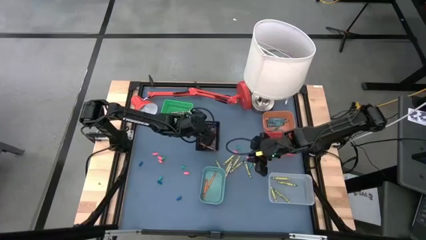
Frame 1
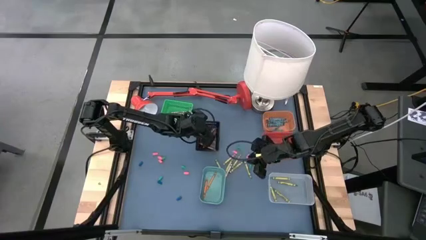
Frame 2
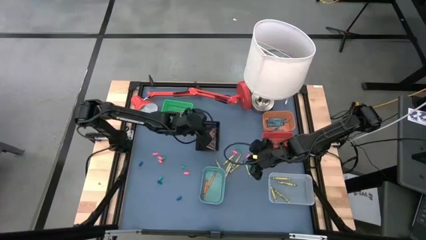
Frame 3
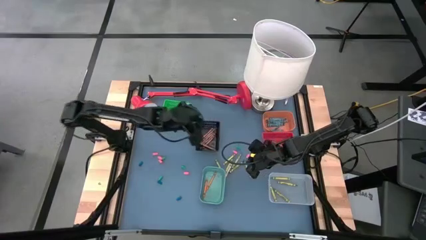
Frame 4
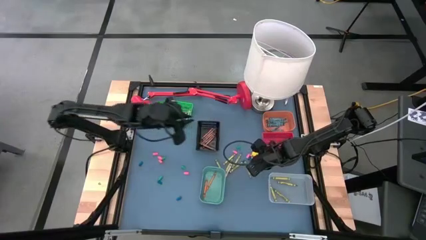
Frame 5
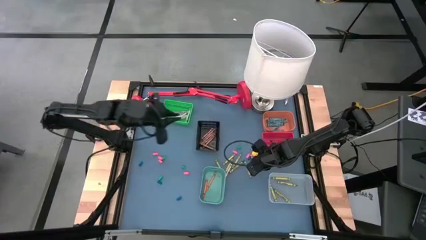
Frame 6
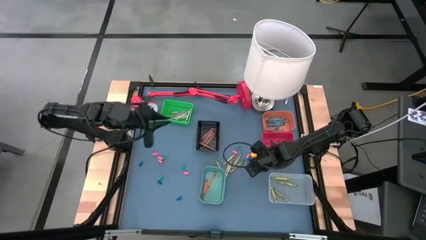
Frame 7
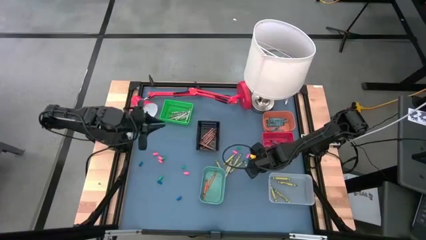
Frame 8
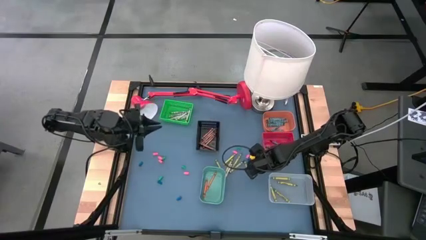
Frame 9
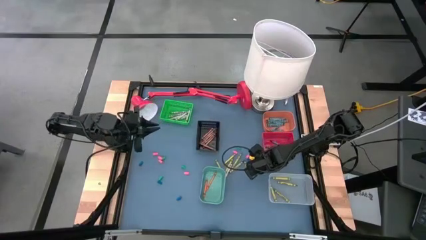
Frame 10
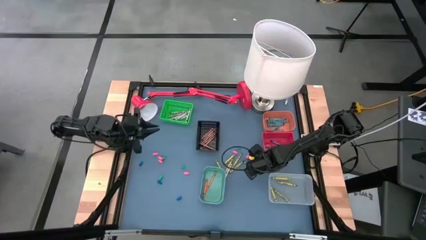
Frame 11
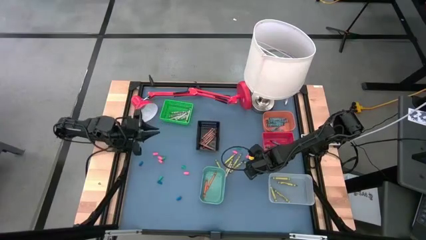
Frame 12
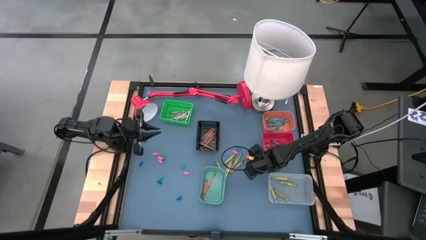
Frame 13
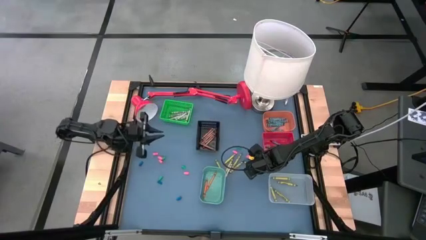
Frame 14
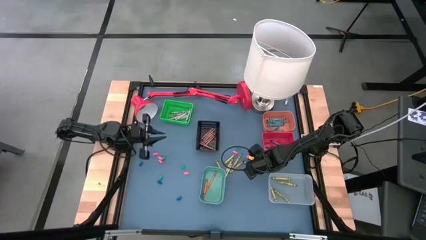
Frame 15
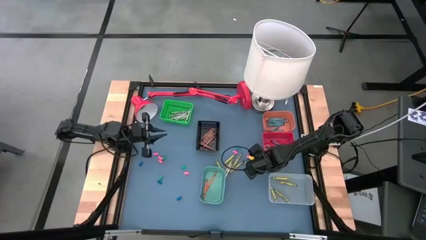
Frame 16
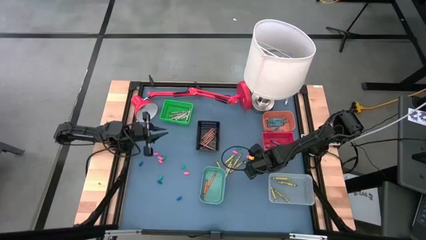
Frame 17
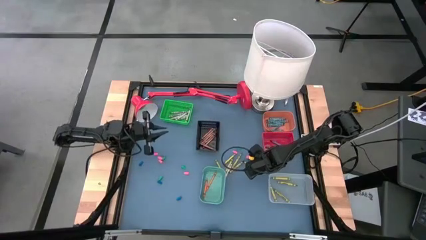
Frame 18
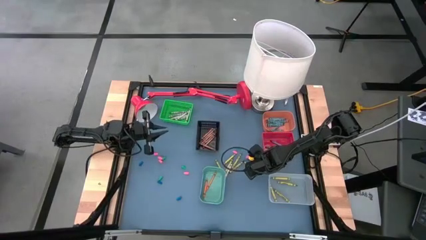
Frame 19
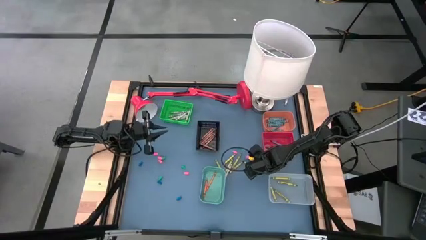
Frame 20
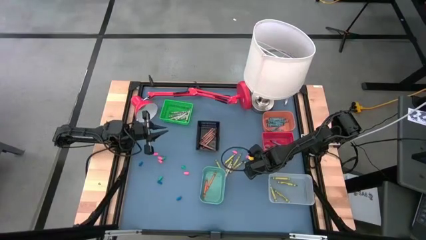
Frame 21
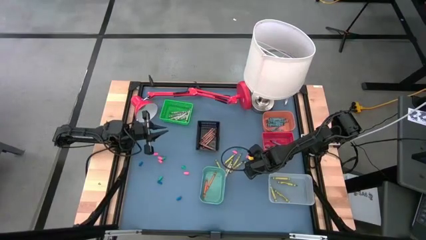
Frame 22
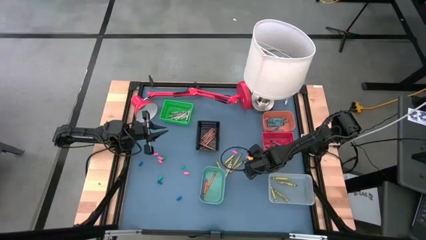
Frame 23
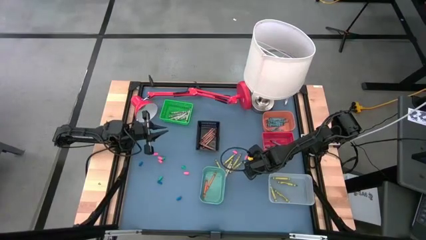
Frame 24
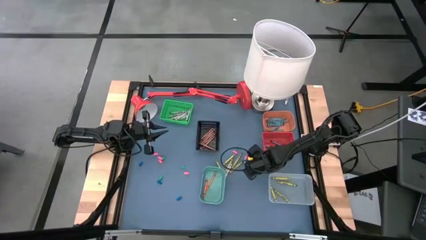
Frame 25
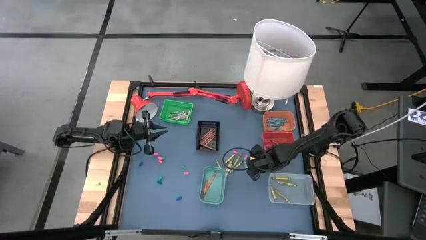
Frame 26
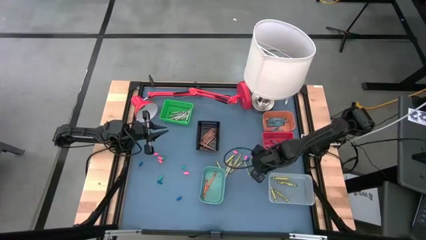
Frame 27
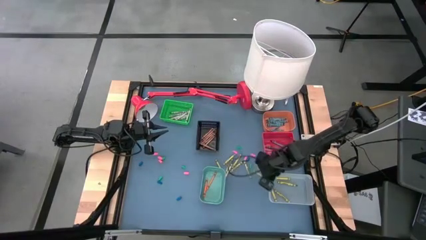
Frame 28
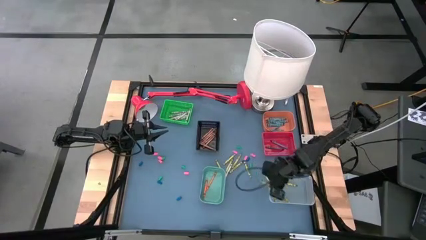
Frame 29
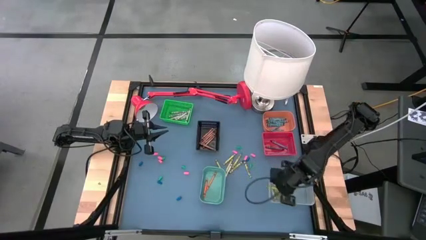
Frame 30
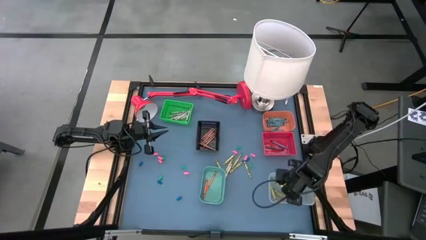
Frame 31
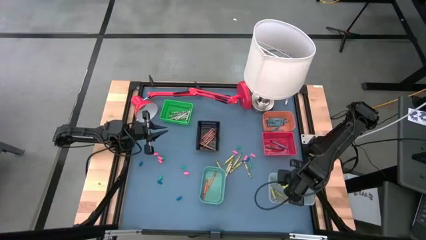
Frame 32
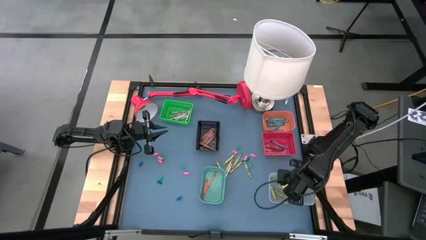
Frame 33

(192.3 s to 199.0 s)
Task: Sort crayons
Put the green crayon into the transparent bin

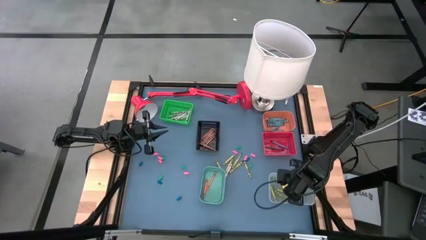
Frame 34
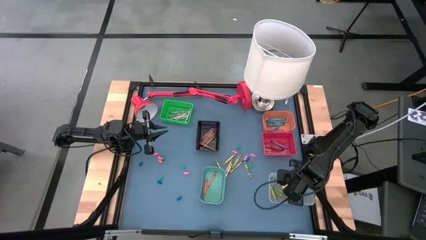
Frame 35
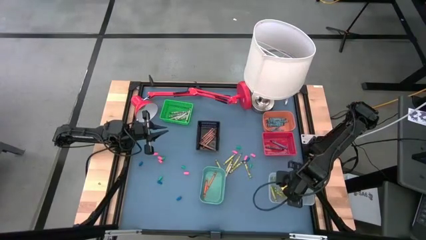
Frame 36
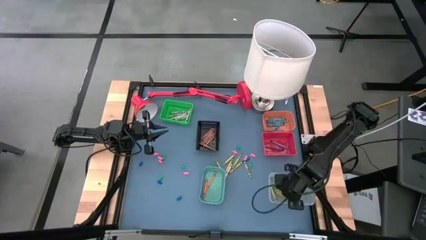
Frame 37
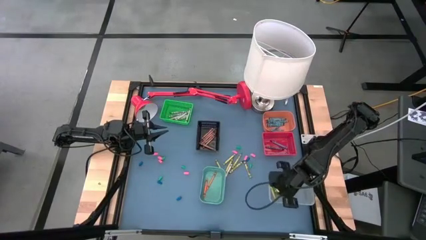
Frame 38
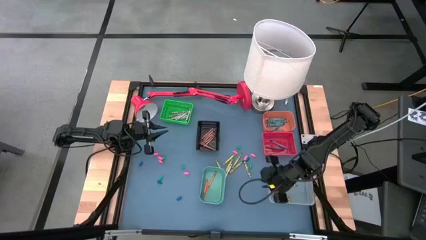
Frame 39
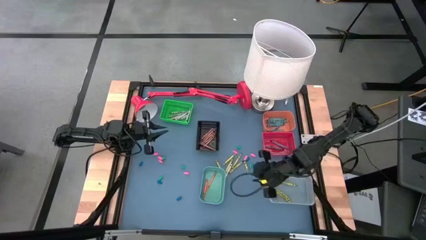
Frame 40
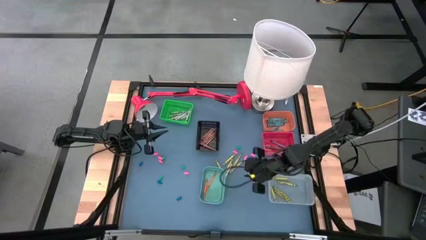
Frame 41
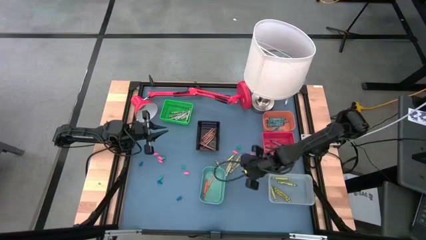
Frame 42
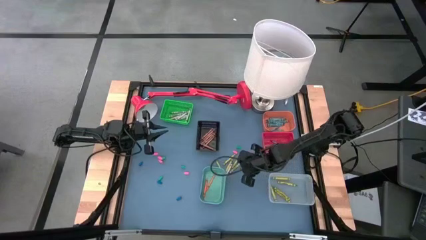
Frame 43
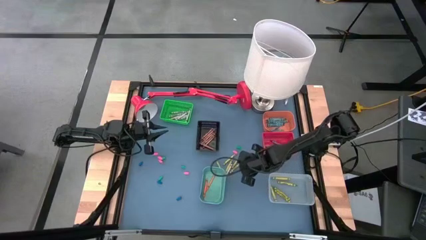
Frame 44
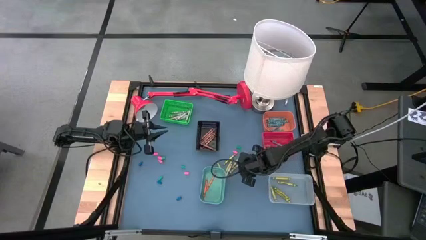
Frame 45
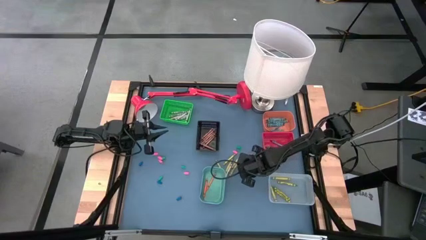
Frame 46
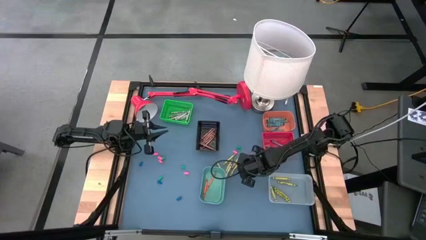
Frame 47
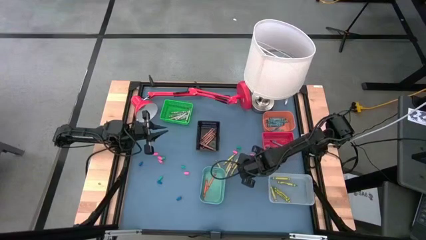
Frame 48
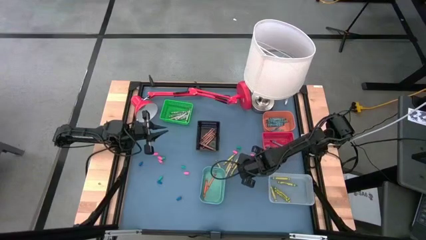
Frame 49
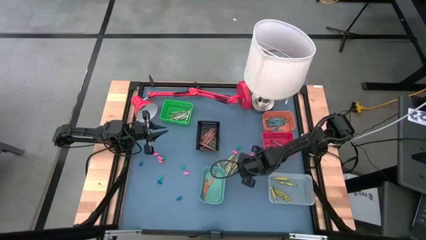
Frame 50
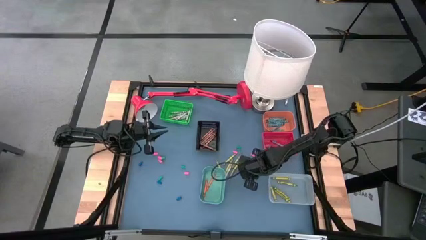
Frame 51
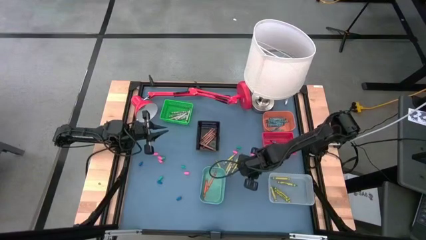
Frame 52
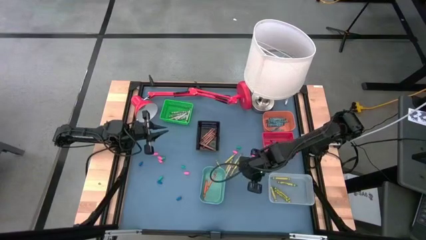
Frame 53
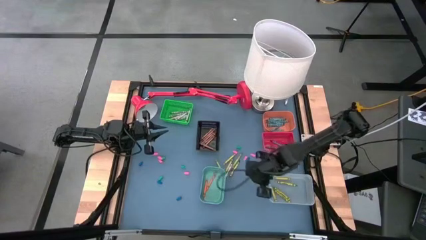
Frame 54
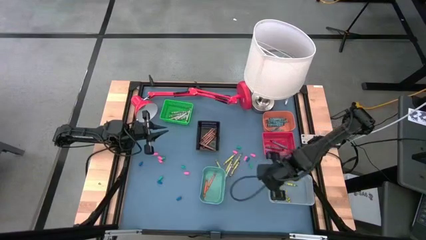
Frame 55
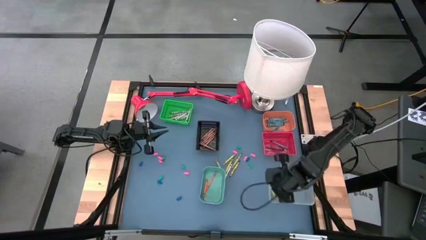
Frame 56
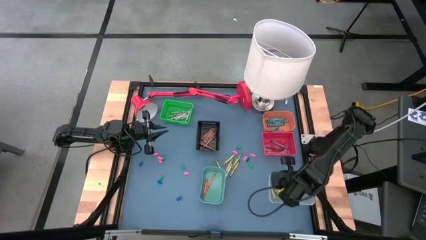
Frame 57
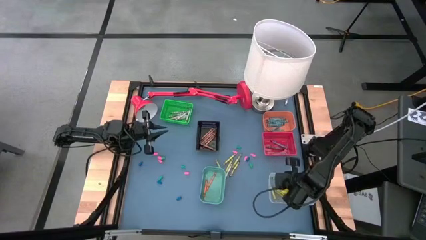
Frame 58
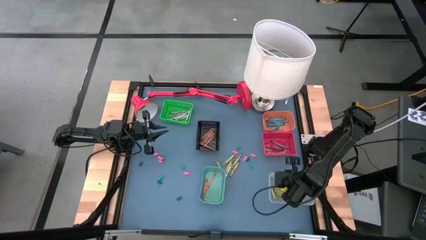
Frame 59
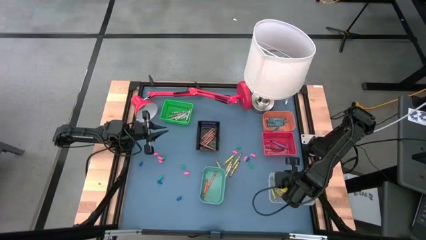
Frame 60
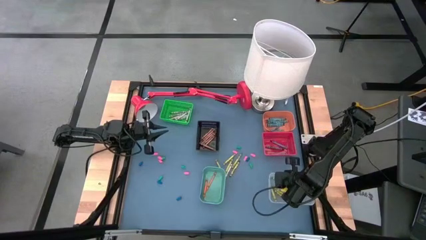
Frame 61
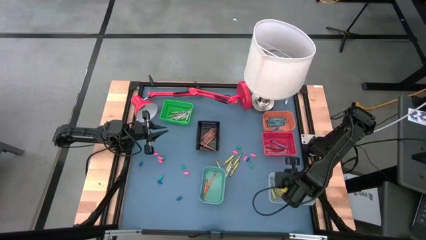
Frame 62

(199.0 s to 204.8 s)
Put the green crayon into the transparent bin

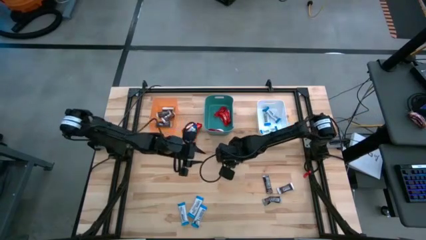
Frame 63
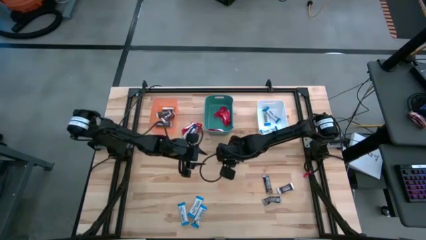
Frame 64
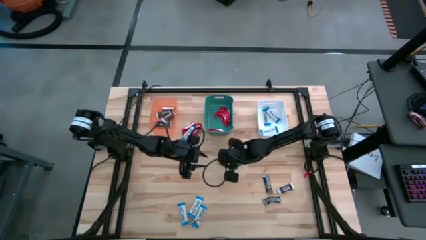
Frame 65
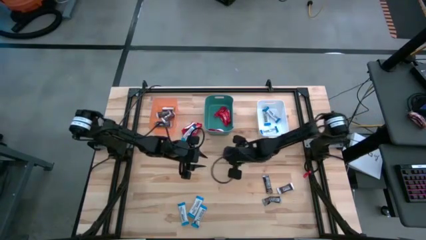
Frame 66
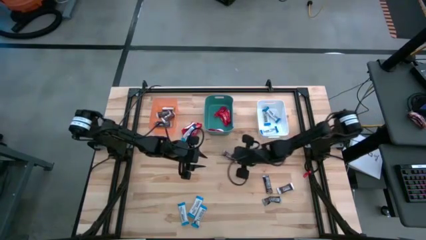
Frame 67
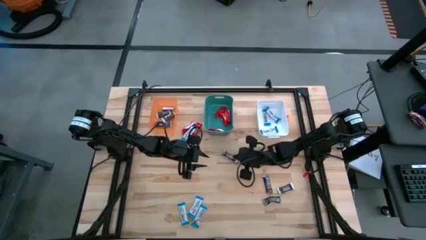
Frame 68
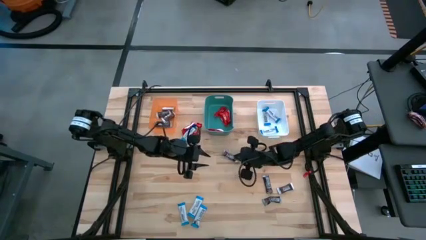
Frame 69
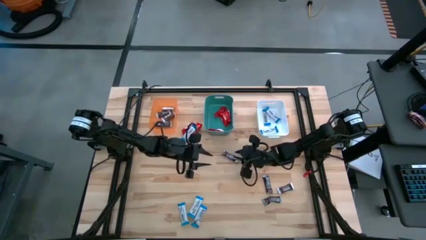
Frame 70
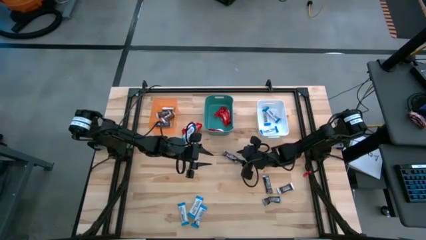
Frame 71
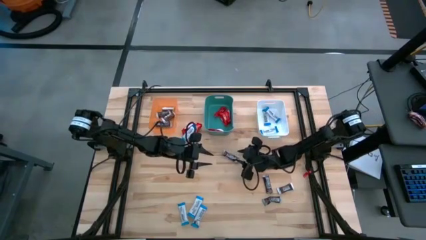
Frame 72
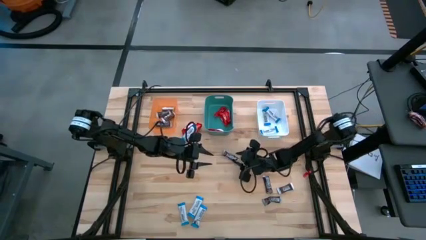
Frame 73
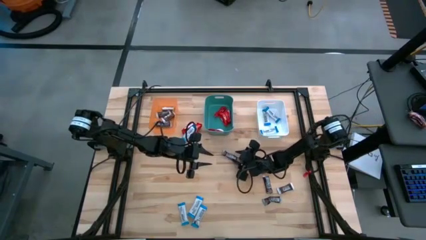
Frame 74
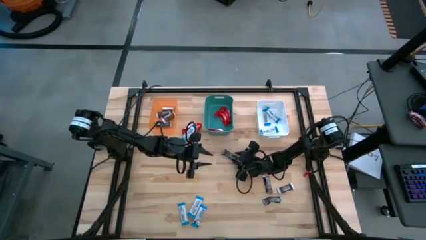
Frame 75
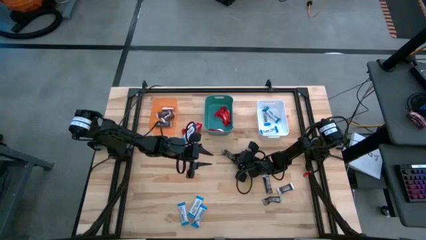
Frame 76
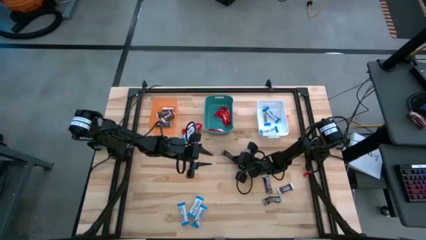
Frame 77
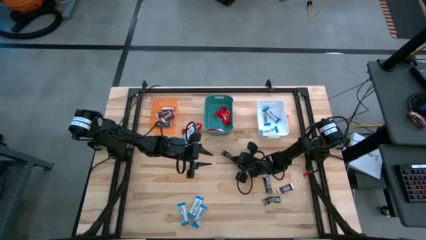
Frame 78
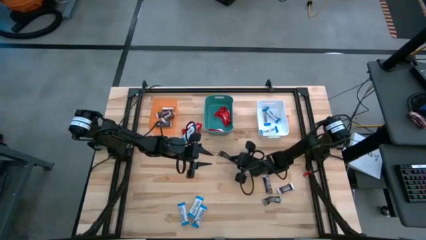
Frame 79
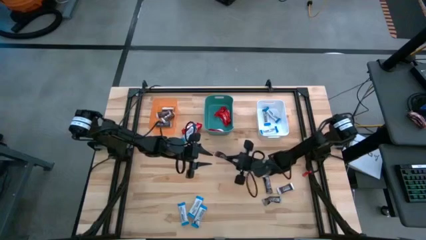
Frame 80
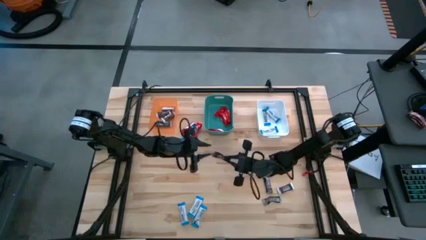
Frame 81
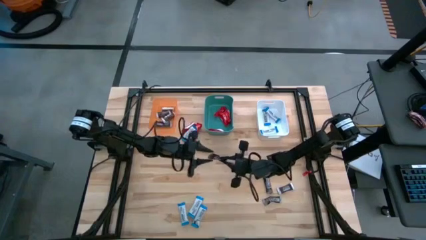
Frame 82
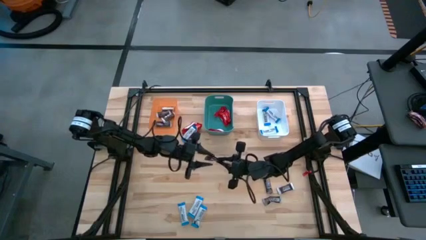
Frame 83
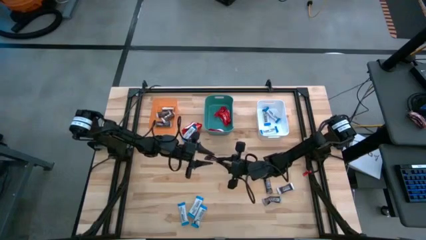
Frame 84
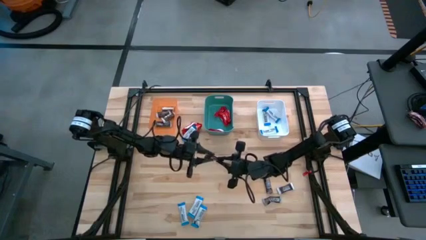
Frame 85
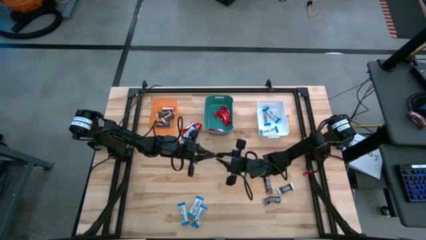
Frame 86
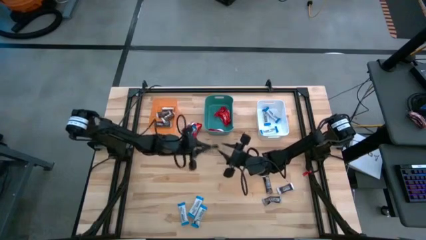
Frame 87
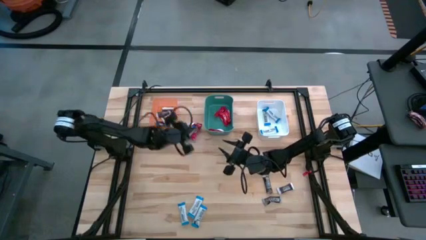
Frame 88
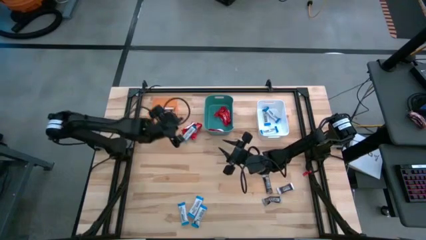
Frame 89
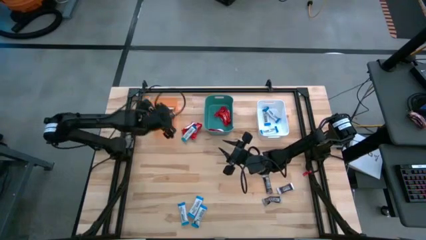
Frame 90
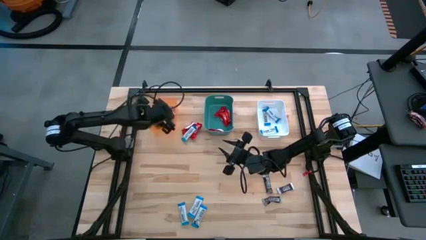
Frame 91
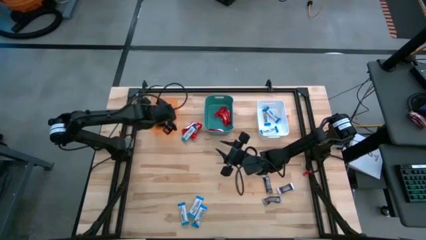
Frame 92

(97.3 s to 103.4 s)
Task: Organize candy in baskets
Put the black chocolate bar into the orange bin
